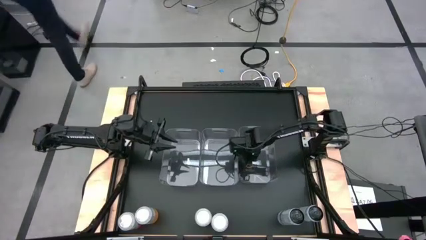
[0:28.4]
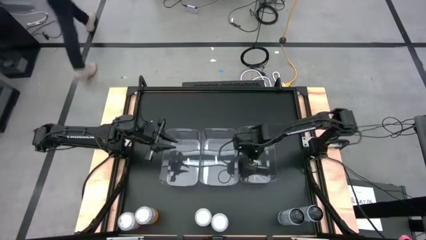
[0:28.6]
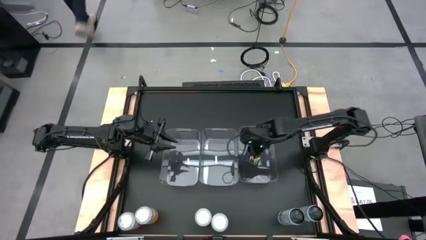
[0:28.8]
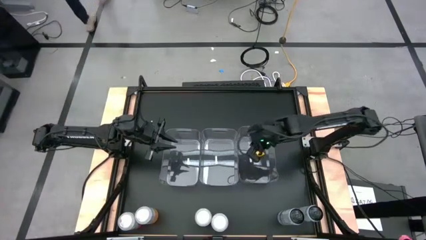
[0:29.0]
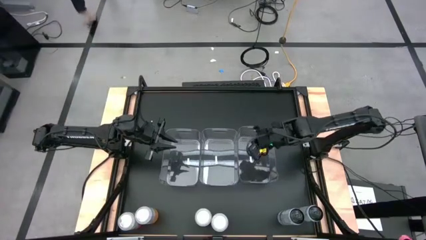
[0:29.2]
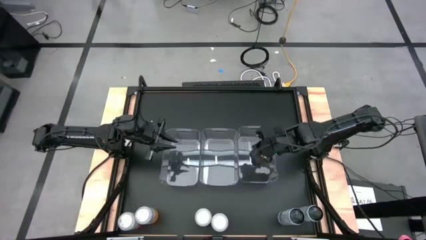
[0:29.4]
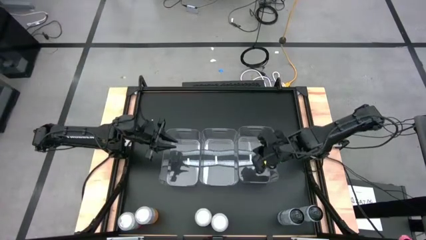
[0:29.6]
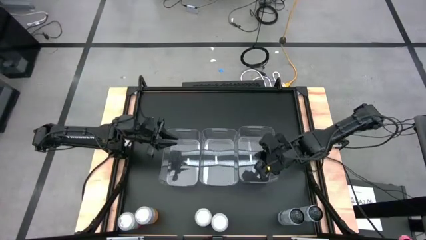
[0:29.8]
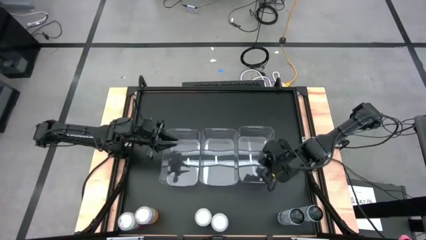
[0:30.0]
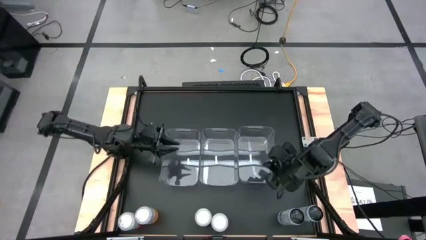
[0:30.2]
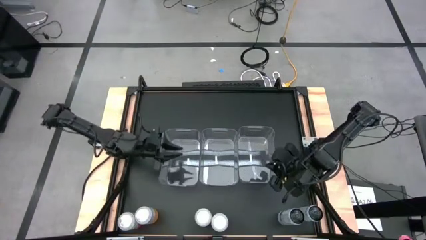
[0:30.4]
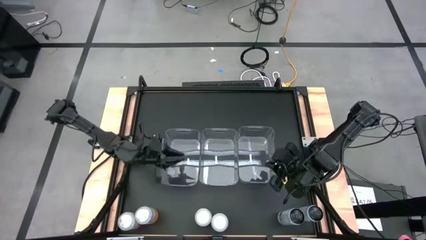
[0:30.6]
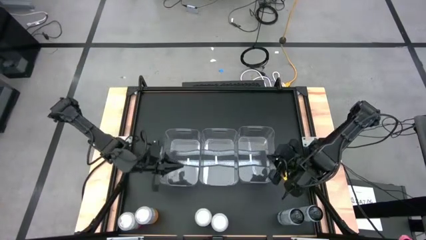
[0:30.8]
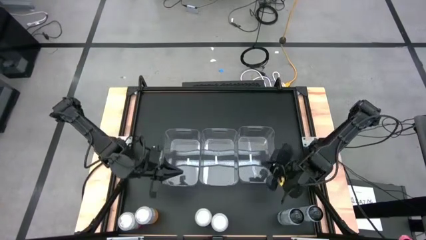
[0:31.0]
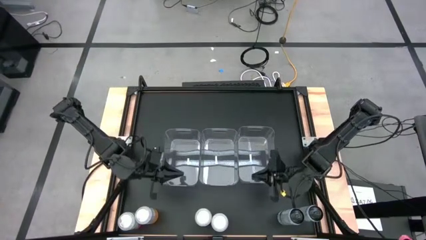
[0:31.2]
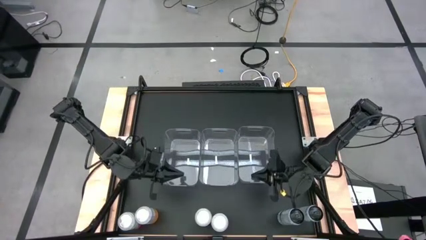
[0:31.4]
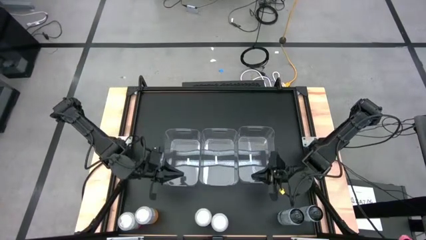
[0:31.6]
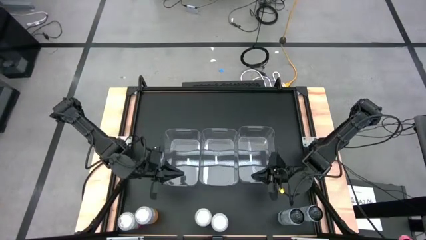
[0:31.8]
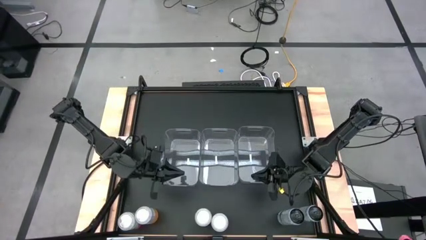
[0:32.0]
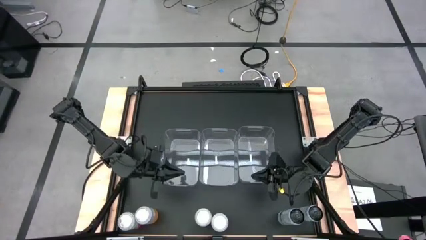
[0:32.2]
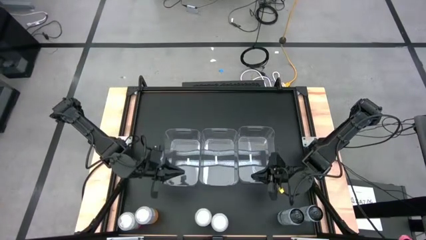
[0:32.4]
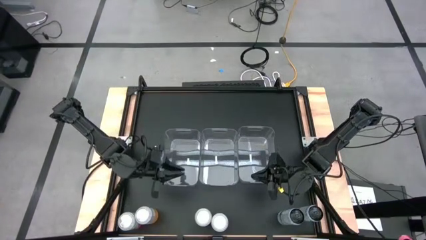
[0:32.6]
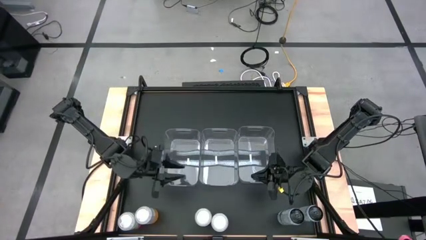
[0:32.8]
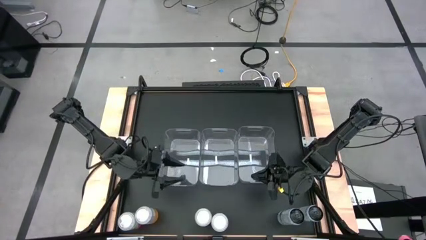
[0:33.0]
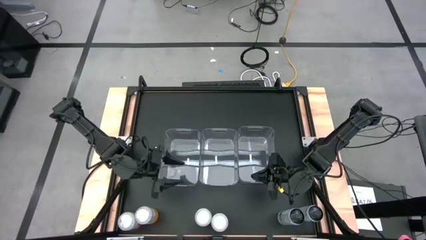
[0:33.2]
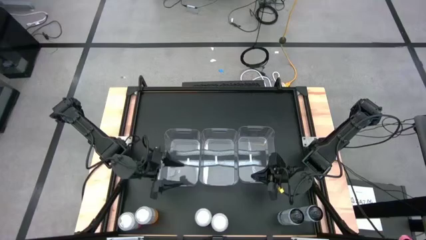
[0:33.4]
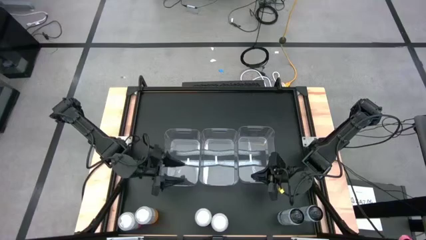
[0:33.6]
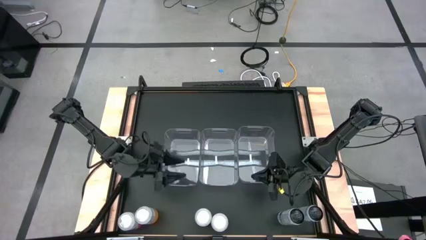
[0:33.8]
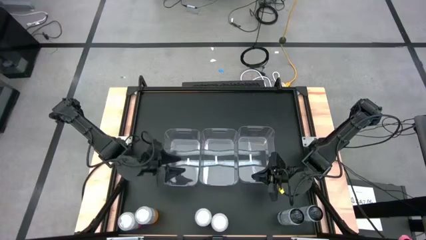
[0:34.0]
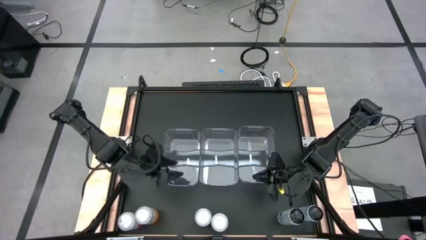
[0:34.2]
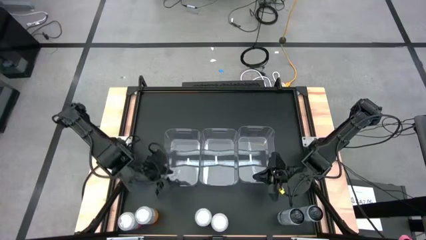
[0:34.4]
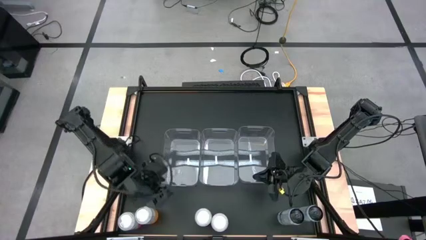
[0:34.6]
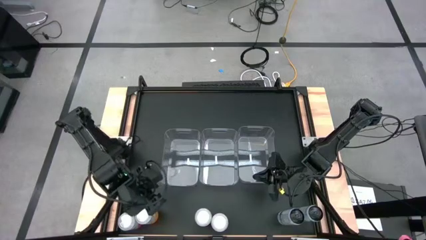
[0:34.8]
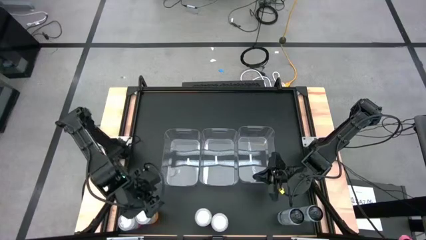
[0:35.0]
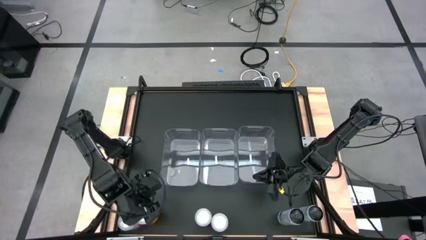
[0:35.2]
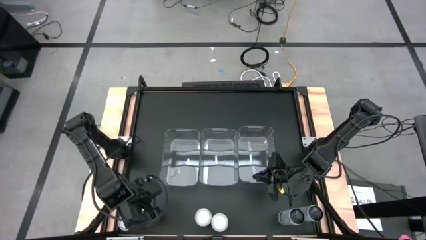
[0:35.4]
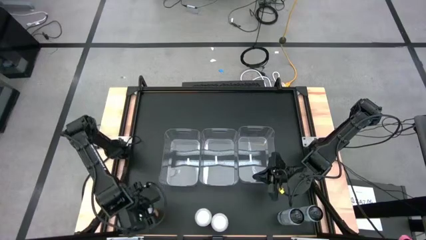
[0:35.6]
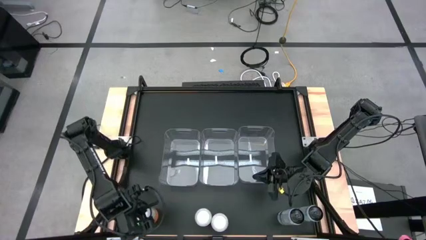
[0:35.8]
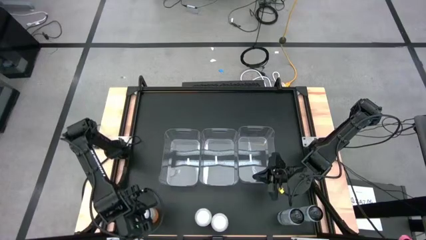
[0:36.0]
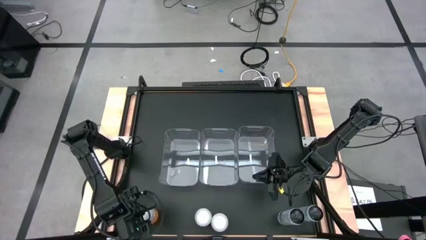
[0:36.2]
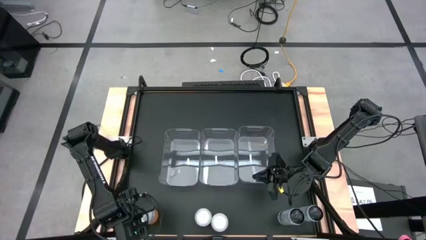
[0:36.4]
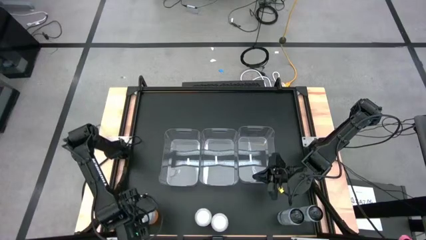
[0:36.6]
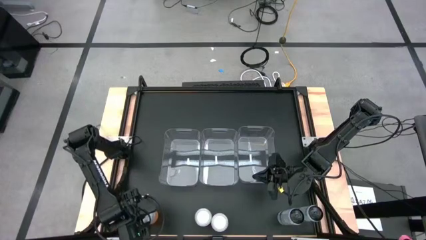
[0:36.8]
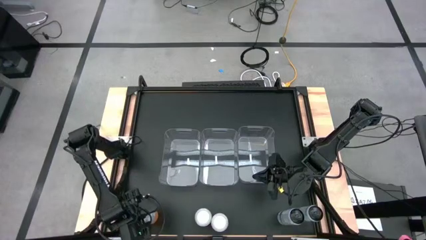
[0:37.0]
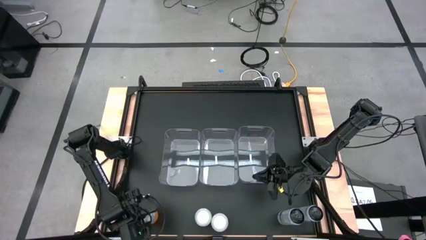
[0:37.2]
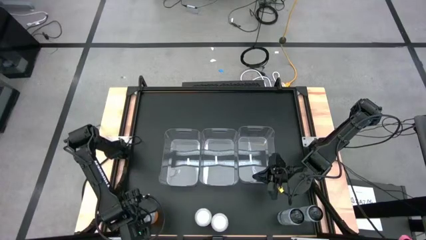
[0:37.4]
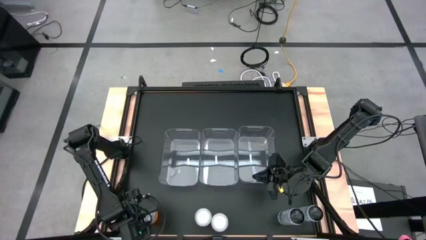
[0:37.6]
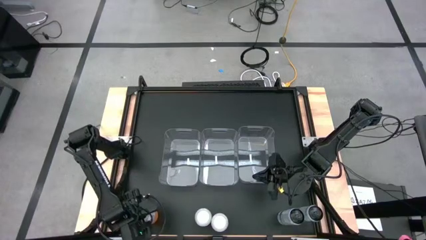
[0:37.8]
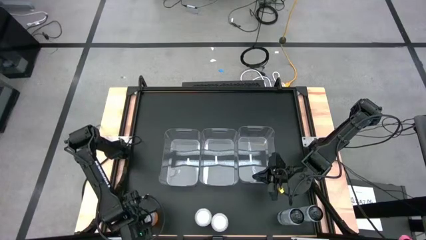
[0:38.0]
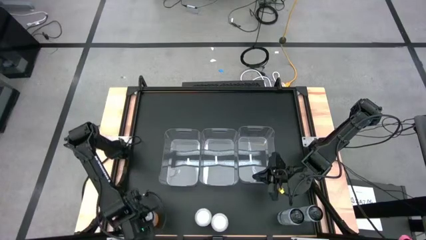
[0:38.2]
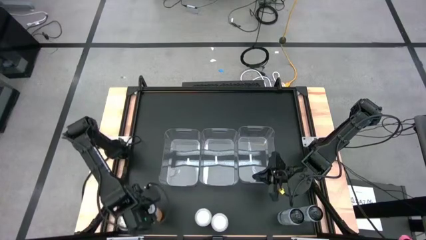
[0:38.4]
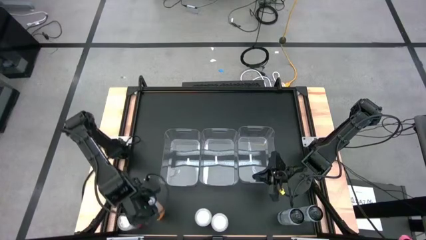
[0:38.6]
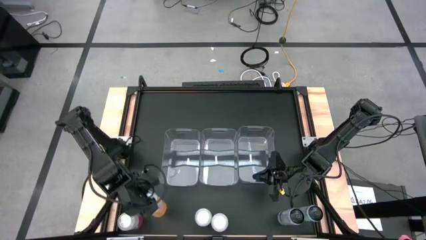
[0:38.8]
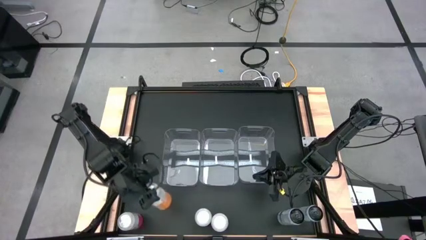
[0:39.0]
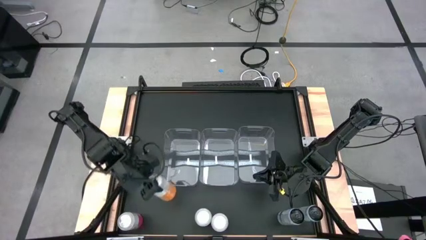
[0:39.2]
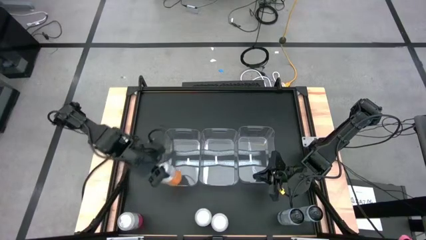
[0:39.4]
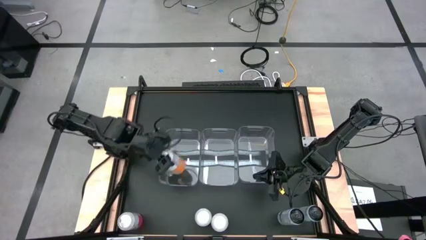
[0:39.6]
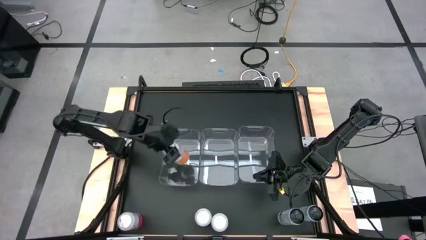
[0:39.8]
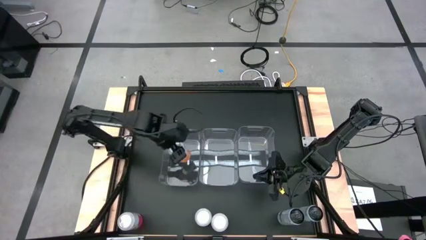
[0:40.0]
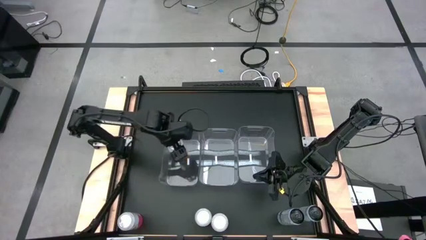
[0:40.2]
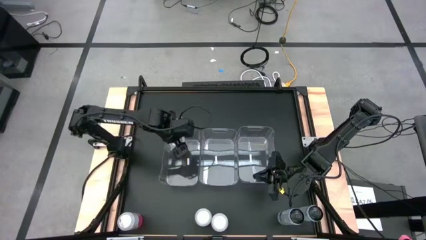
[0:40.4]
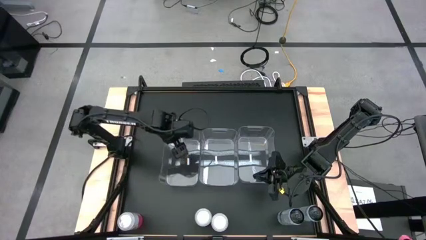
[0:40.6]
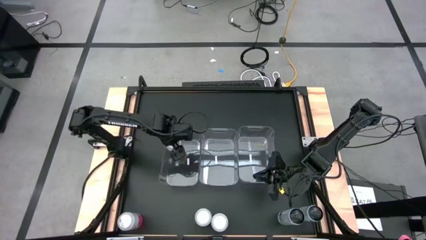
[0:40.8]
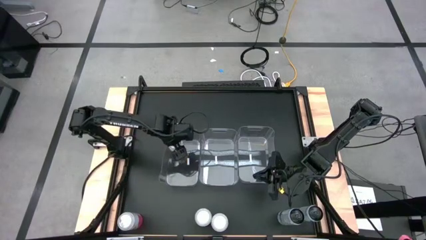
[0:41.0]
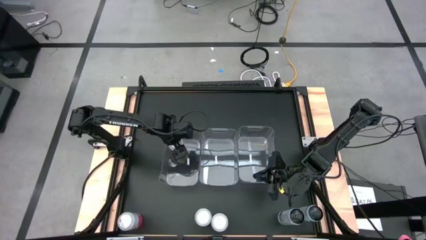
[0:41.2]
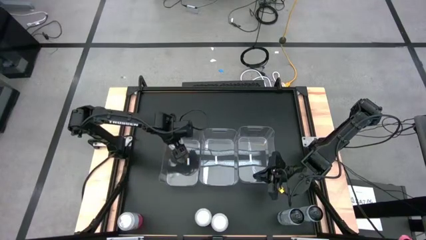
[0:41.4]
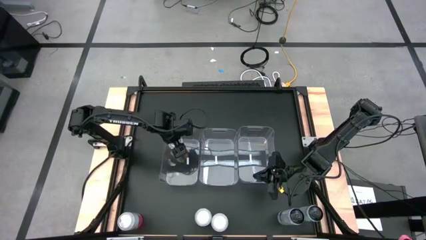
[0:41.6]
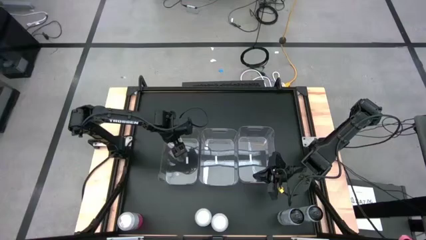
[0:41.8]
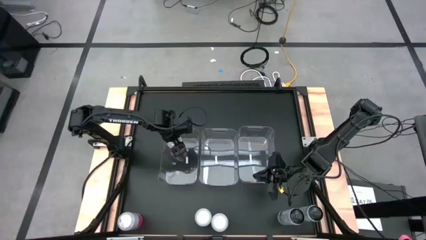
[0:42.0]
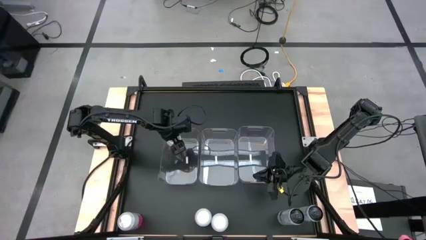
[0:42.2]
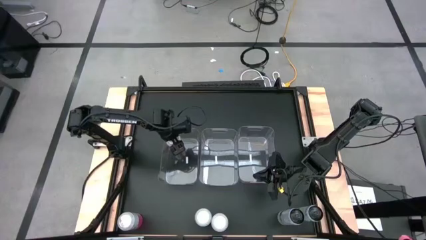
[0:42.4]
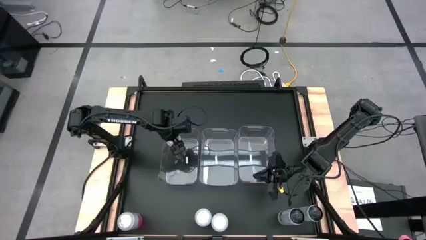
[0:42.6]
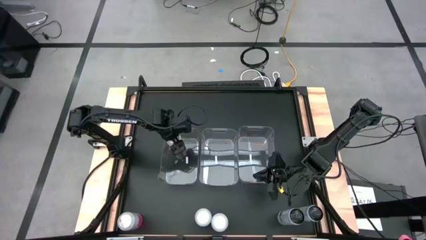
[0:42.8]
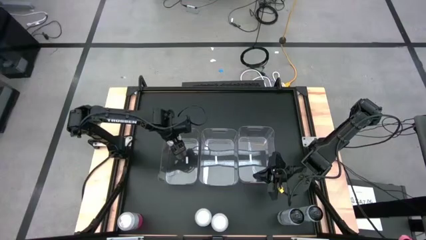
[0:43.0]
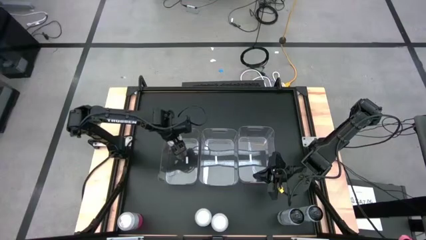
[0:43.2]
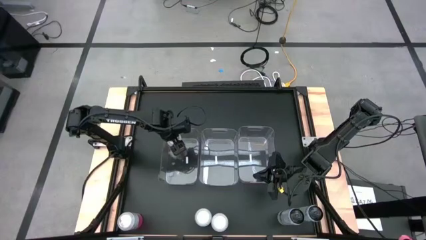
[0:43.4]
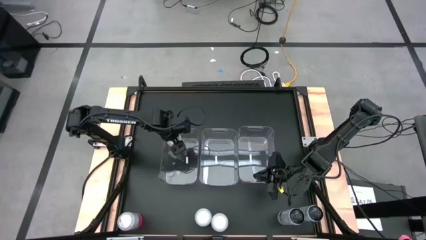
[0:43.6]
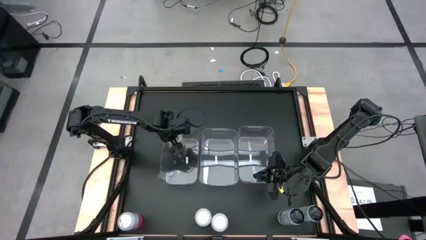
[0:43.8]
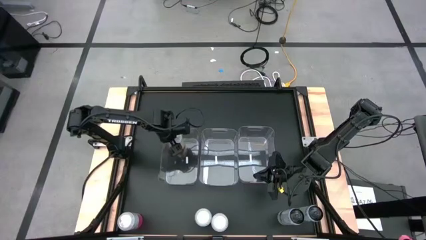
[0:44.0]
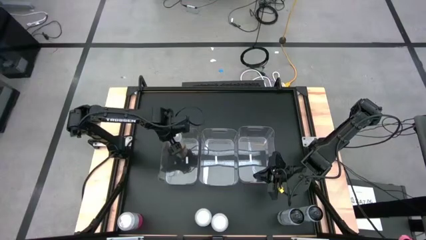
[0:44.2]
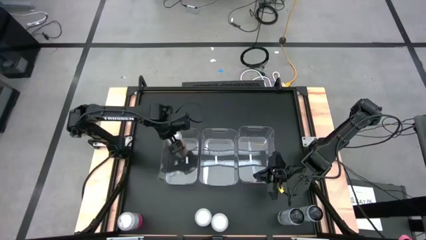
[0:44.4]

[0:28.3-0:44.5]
Task: Sort soda cans
Put the left orange soda can into the left transparent bin
